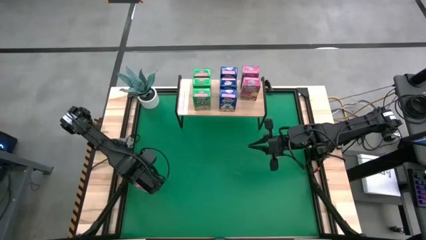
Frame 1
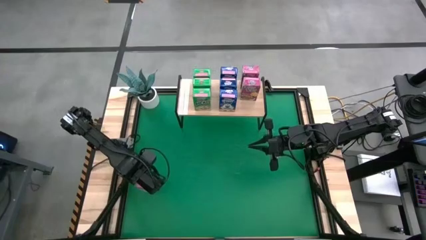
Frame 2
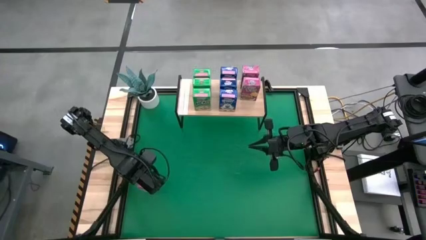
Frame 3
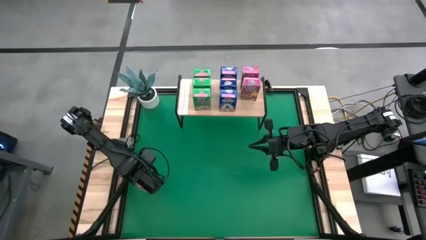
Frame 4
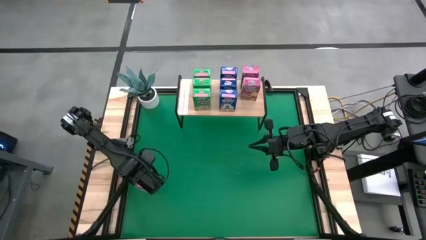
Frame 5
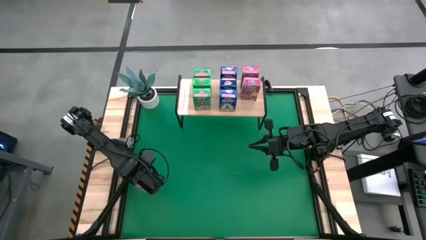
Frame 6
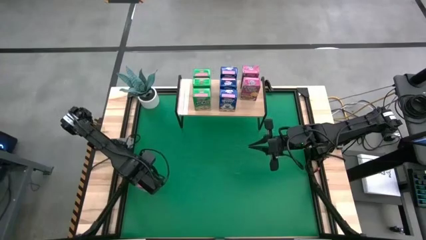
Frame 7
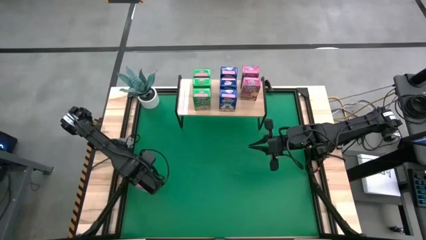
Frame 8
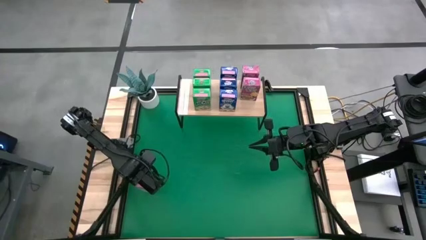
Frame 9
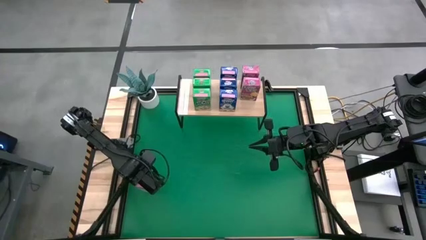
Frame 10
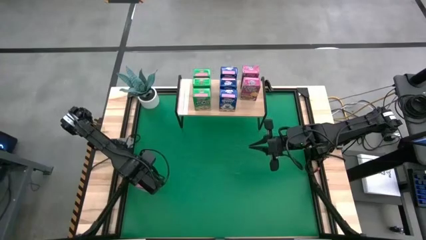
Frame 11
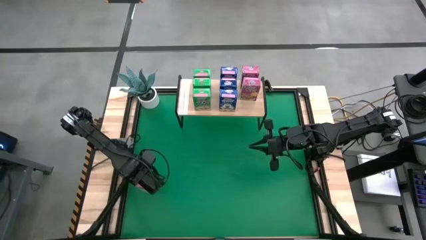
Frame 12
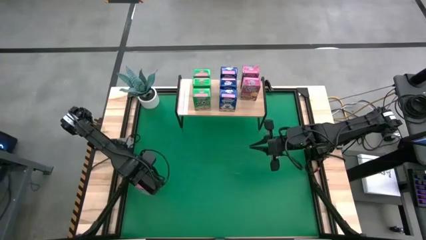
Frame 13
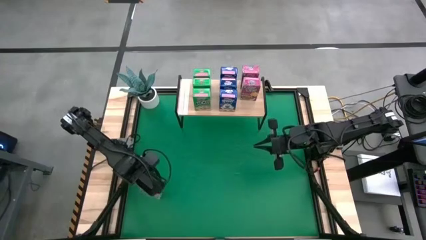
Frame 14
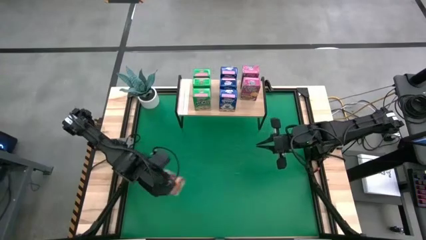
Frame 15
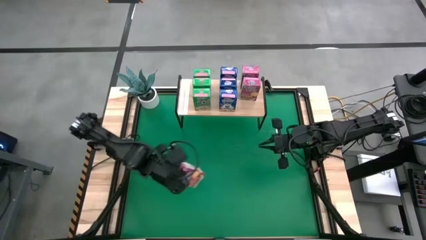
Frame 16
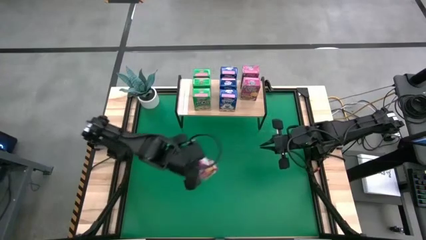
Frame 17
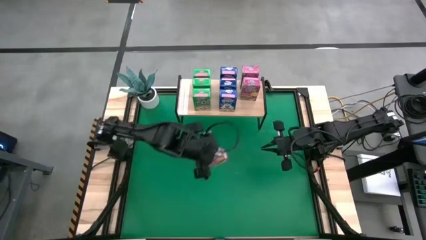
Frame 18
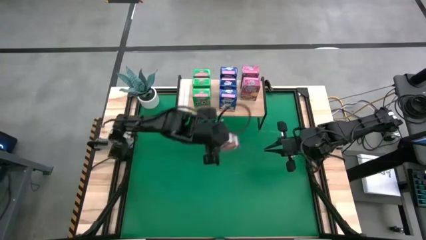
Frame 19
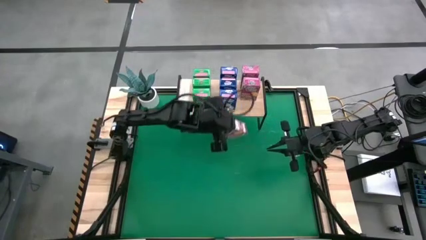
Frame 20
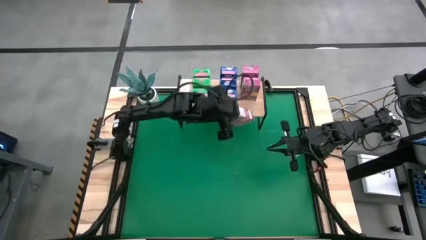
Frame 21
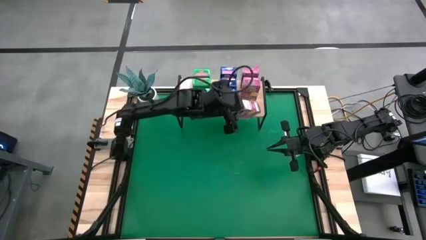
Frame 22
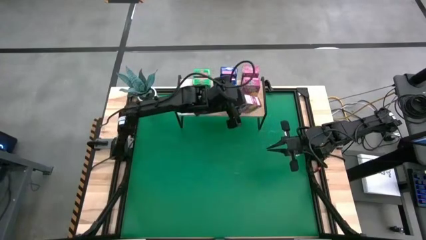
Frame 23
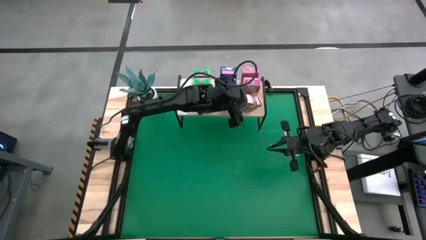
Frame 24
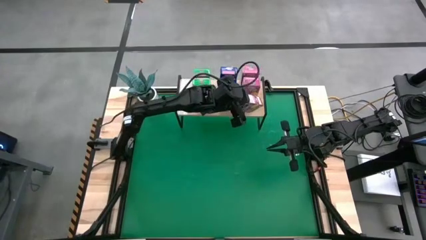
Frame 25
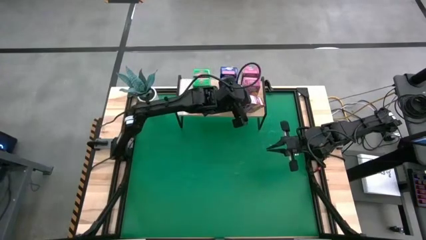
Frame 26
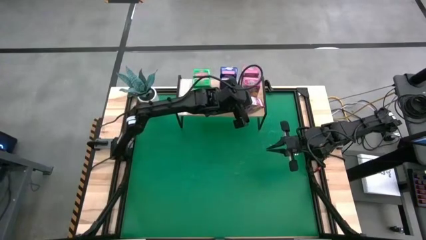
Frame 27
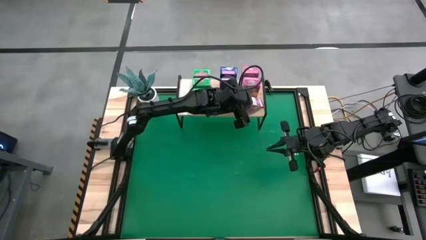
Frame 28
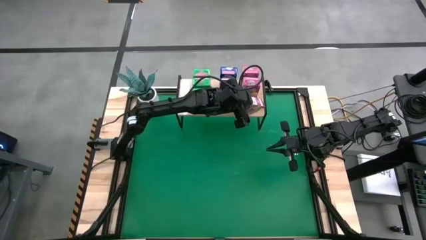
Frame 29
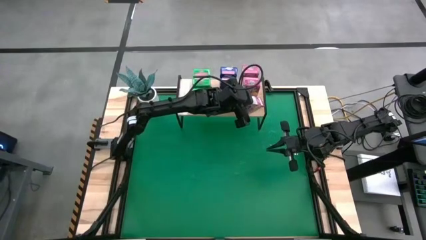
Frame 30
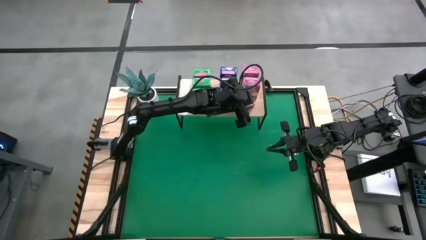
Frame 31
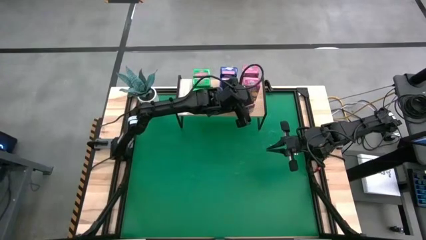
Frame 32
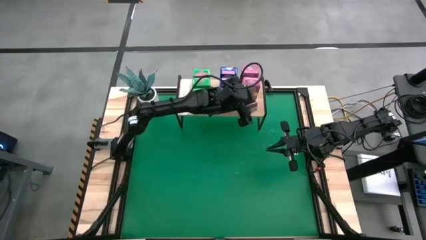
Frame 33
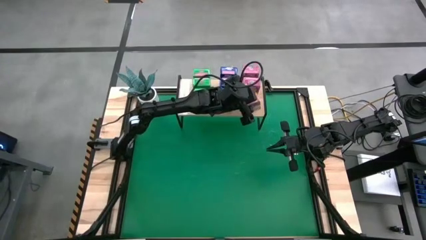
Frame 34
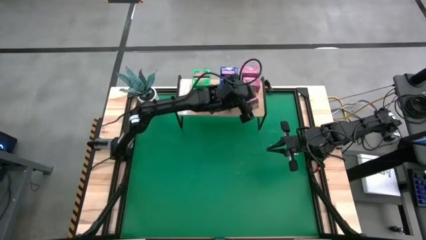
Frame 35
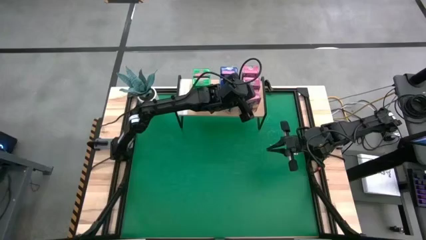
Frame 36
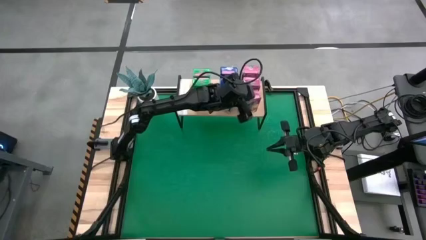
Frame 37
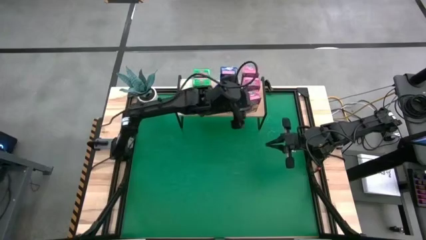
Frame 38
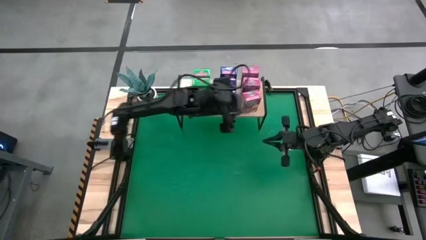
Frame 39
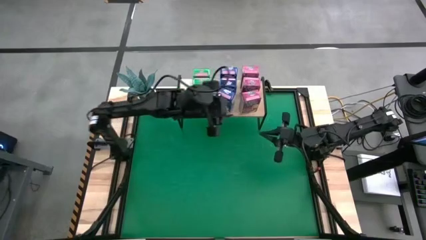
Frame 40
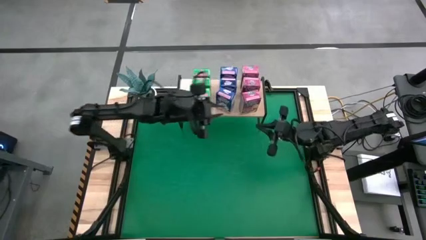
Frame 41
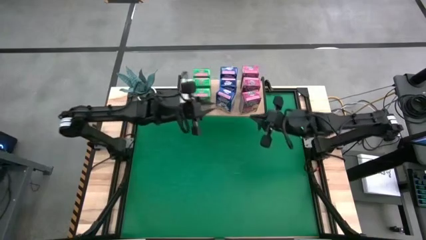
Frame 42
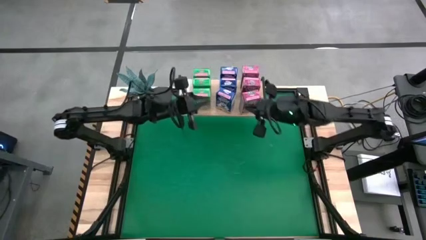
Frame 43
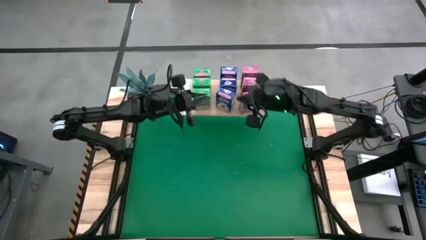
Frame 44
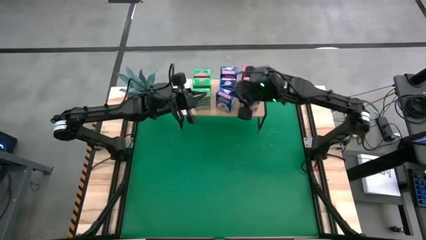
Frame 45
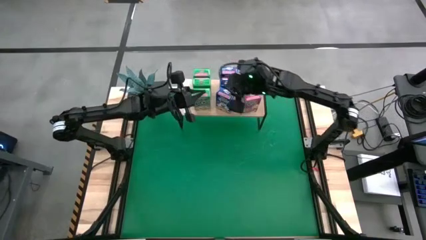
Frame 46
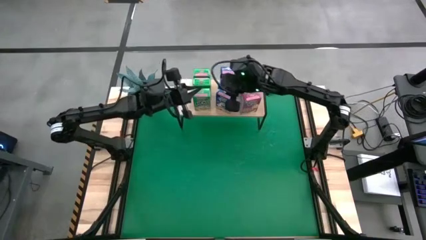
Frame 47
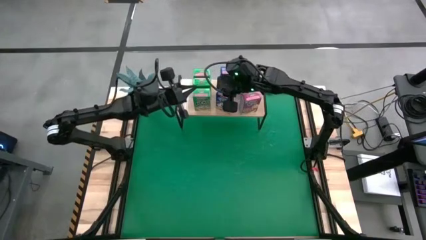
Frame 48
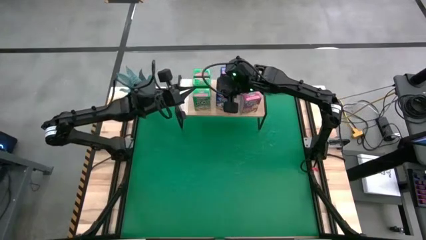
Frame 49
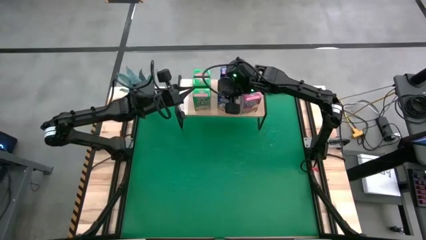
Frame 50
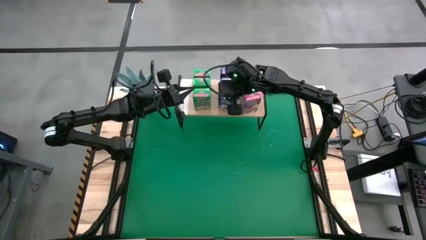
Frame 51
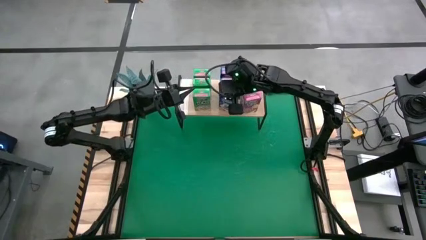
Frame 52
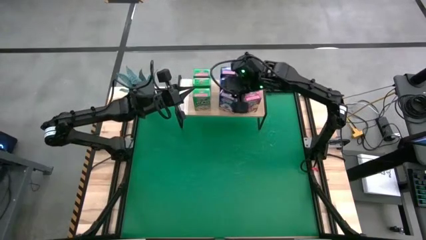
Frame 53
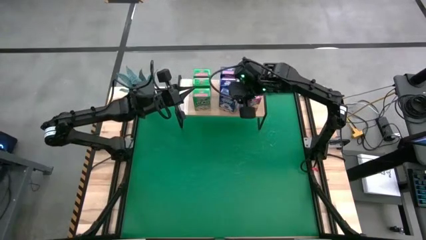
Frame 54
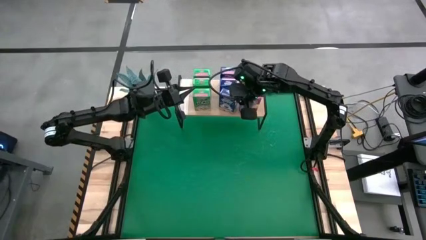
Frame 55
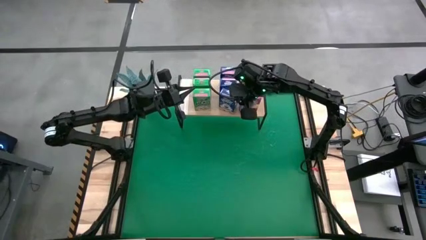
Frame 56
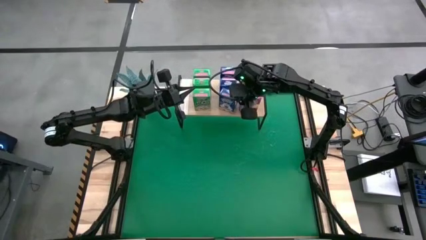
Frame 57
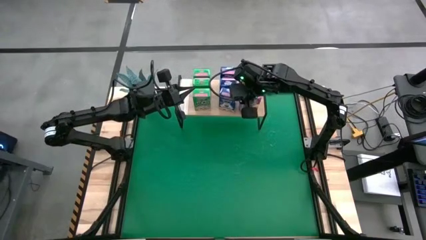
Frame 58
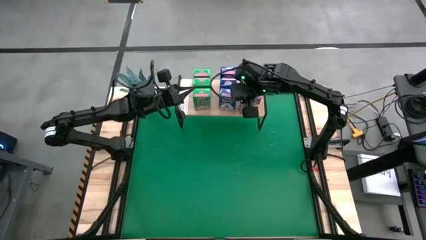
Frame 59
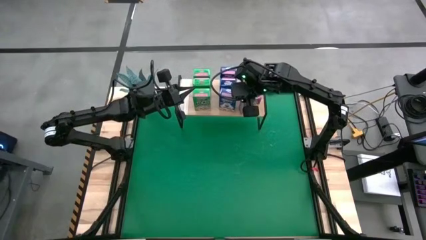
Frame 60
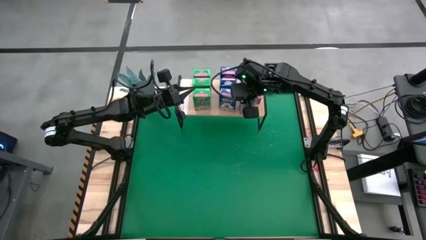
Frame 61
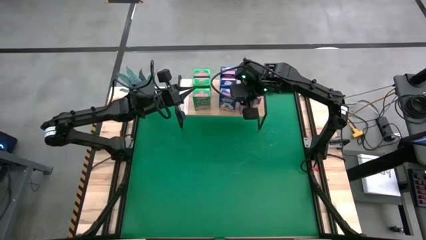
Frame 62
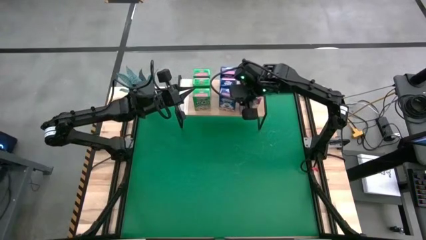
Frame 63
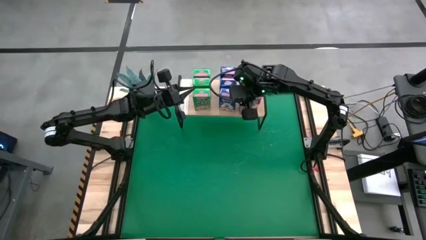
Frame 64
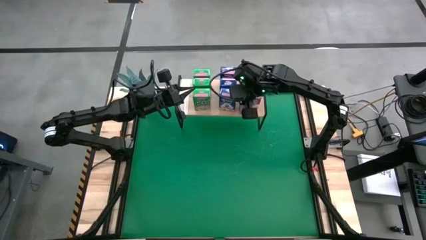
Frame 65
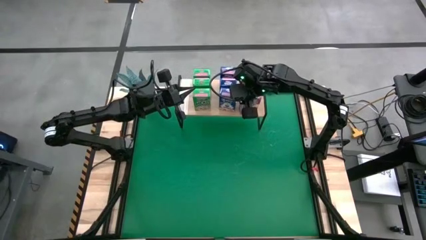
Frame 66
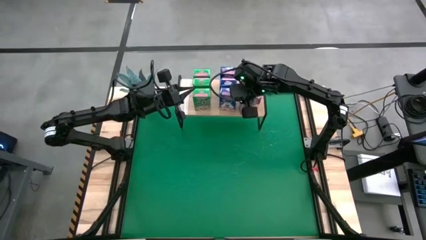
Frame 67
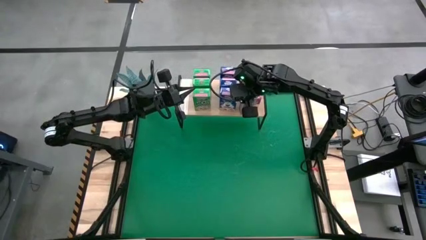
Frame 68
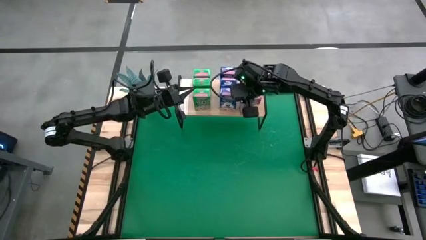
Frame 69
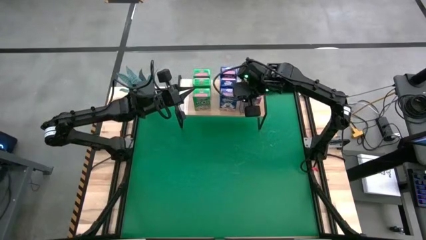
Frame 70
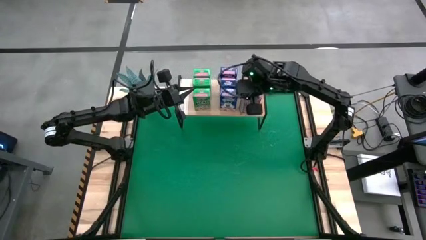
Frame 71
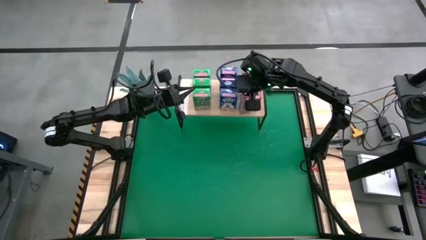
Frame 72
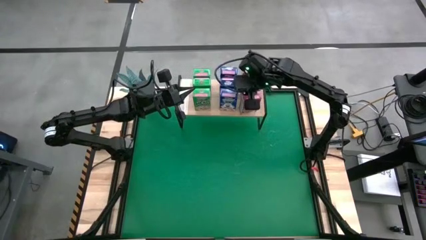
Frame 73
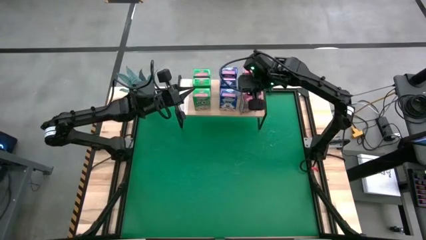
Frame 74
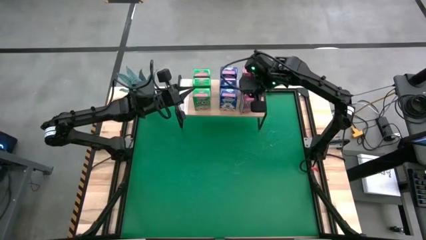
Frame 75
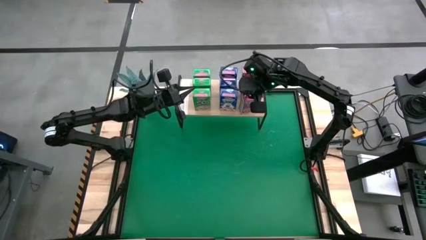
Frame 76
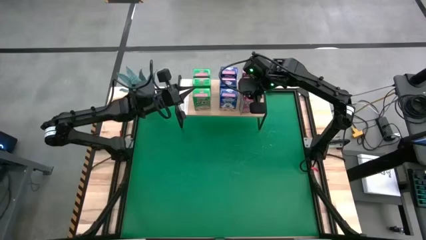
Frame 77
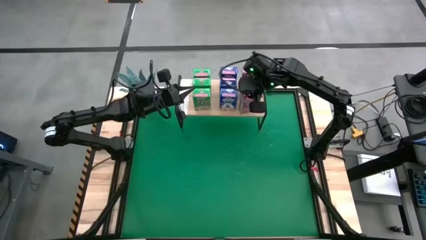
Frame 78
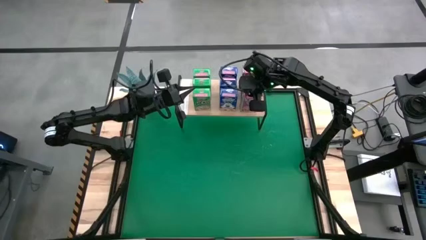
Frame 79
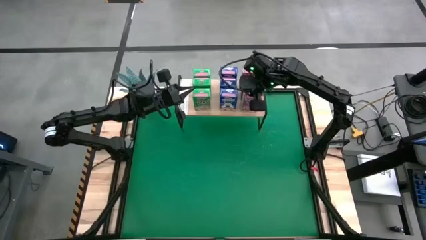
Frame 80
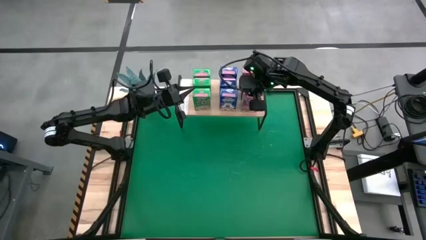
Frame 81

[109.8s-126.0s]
Task: Stack cereal on shelf
Put the pink cereal box on the shelf aligned with the other pink cereal boxes
